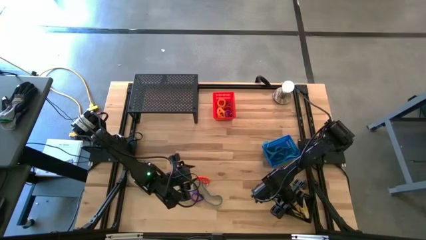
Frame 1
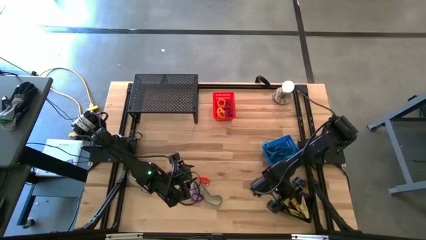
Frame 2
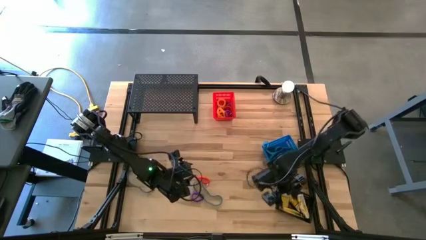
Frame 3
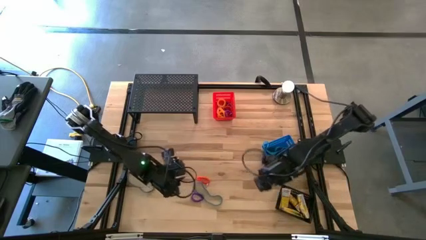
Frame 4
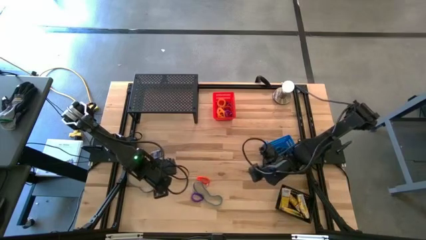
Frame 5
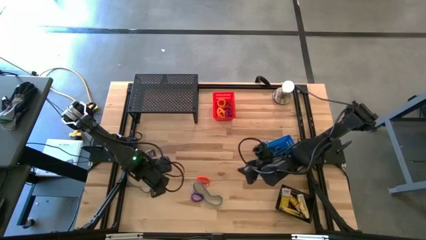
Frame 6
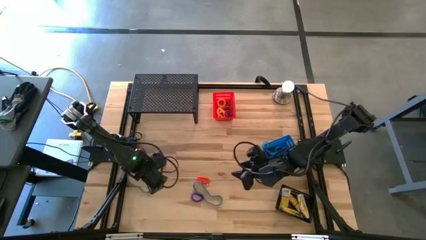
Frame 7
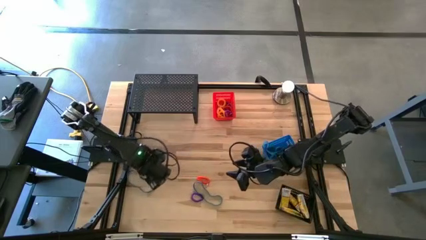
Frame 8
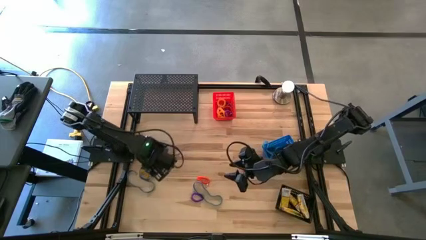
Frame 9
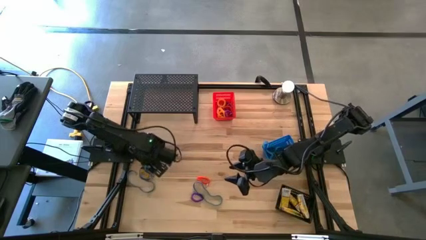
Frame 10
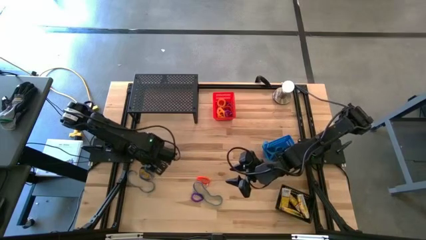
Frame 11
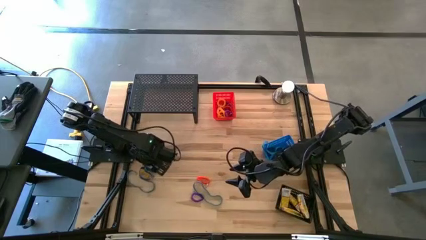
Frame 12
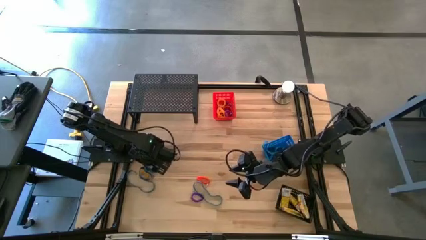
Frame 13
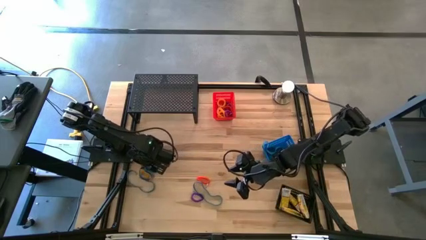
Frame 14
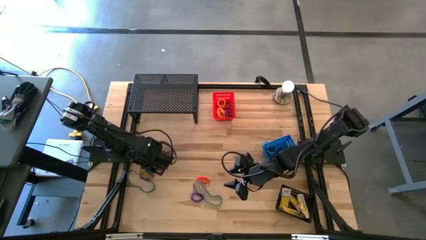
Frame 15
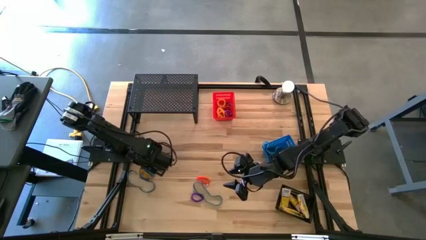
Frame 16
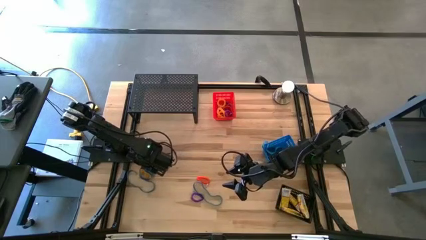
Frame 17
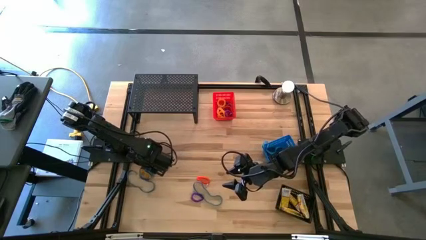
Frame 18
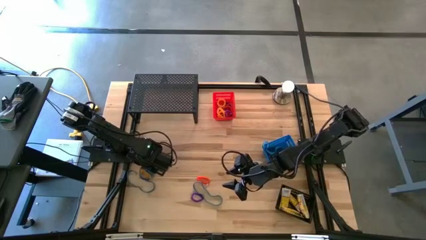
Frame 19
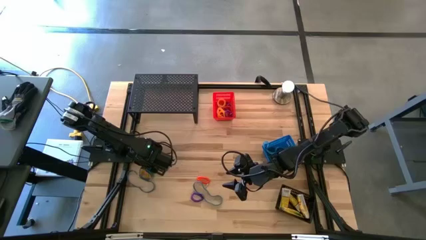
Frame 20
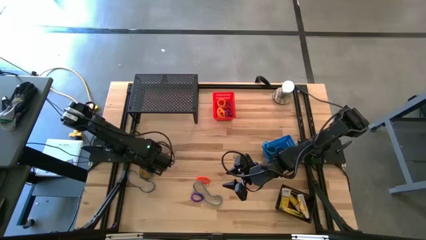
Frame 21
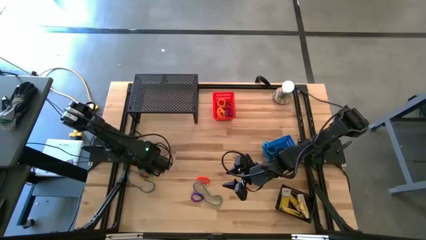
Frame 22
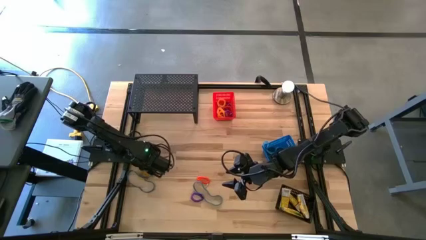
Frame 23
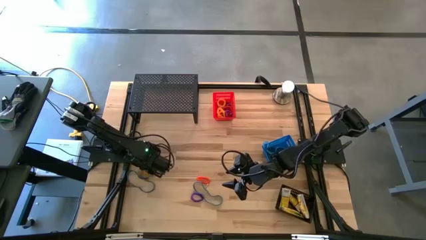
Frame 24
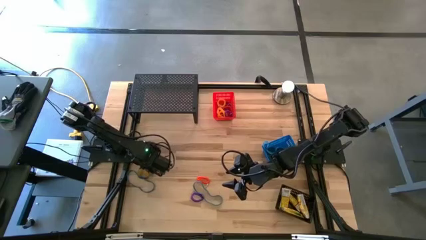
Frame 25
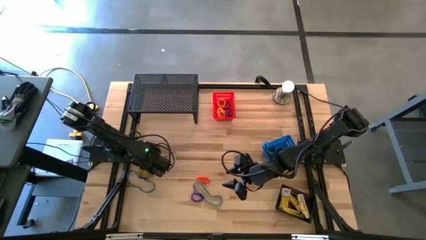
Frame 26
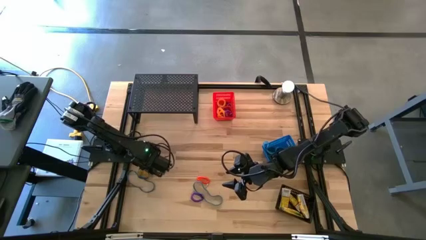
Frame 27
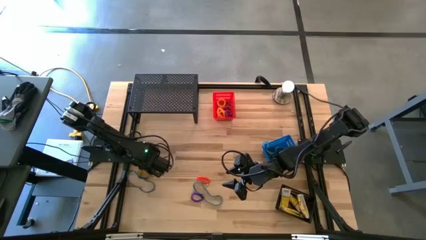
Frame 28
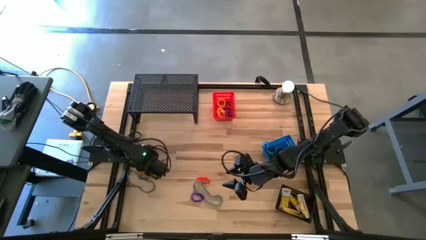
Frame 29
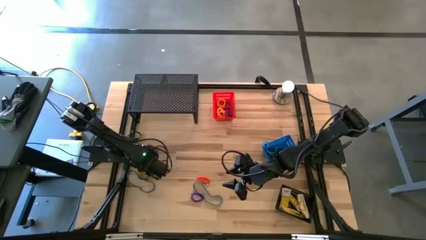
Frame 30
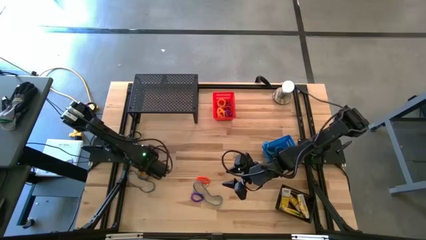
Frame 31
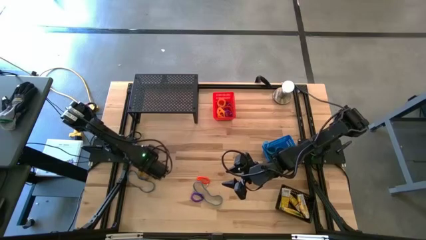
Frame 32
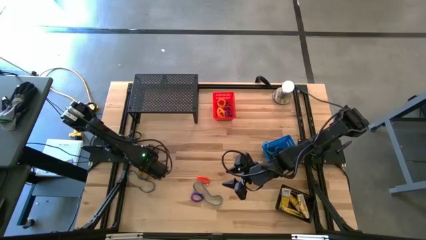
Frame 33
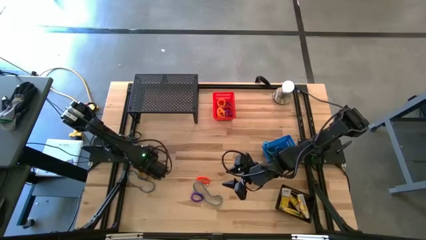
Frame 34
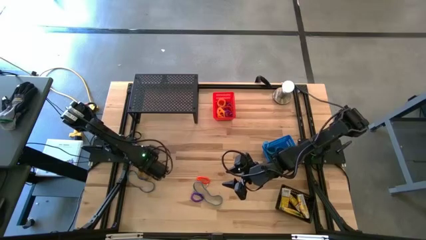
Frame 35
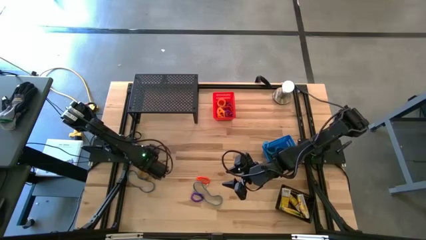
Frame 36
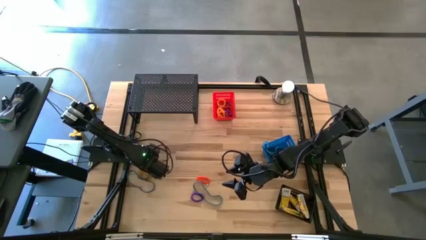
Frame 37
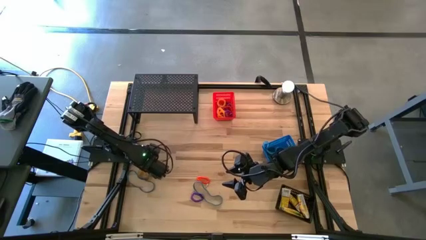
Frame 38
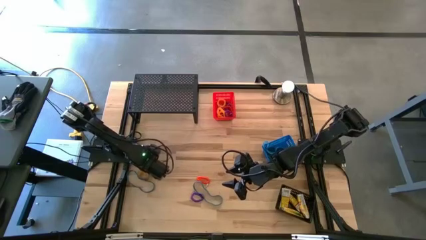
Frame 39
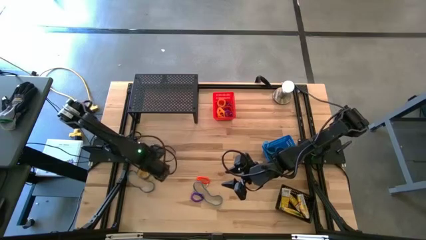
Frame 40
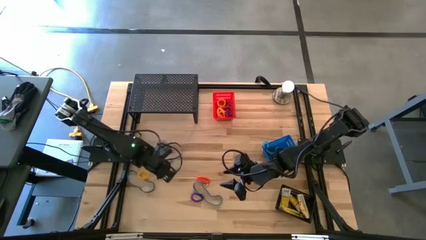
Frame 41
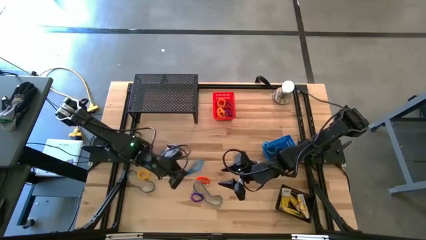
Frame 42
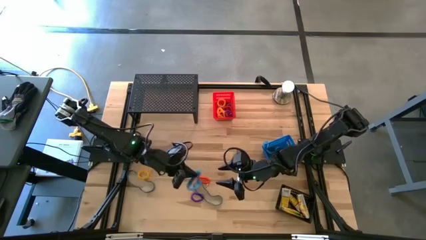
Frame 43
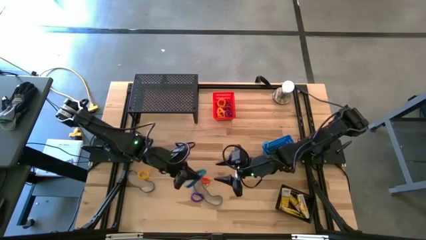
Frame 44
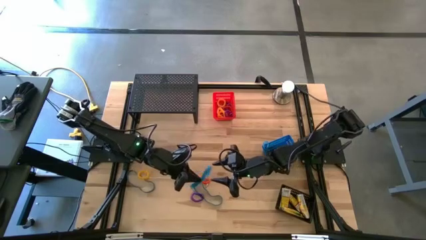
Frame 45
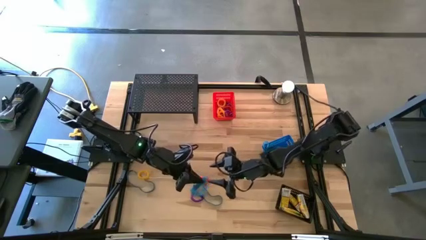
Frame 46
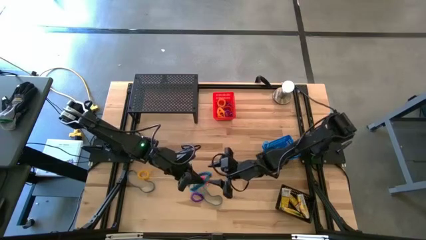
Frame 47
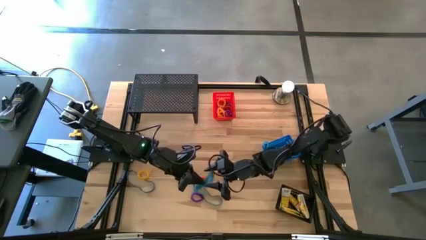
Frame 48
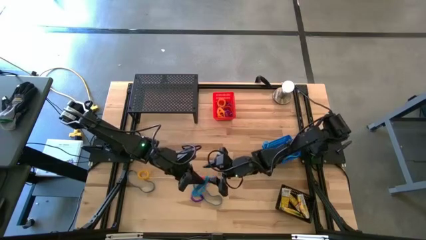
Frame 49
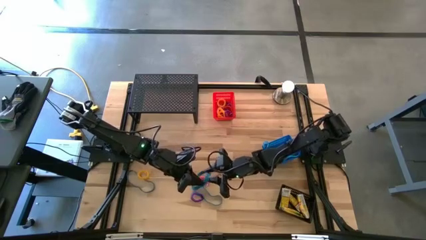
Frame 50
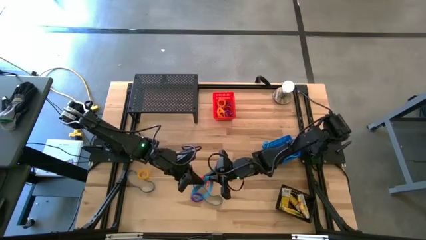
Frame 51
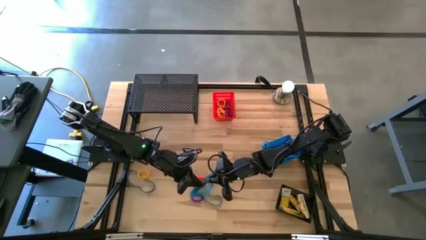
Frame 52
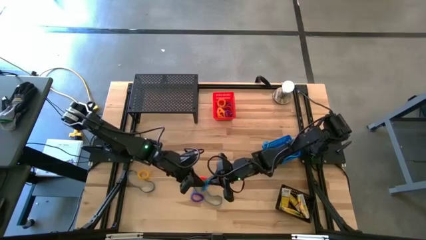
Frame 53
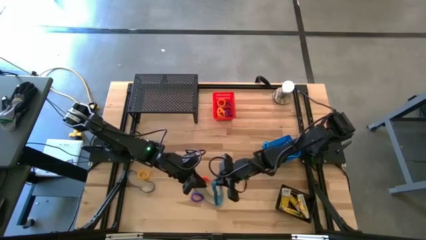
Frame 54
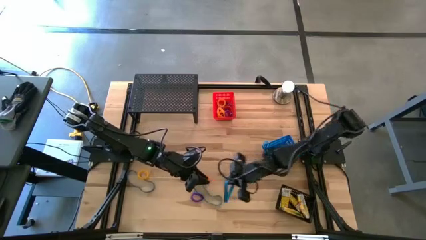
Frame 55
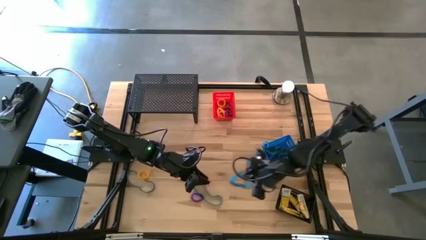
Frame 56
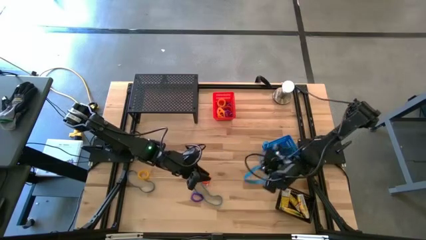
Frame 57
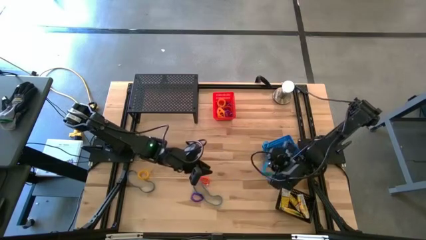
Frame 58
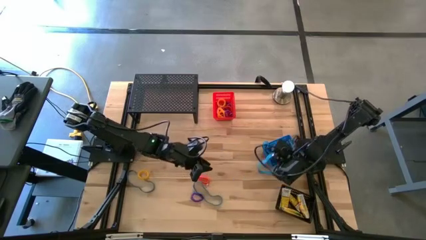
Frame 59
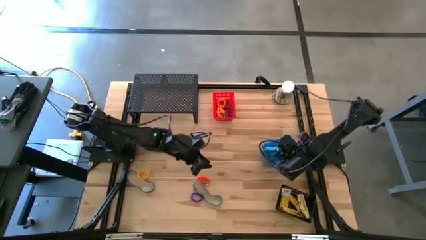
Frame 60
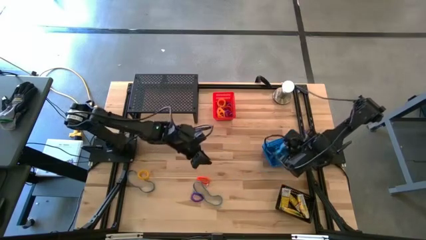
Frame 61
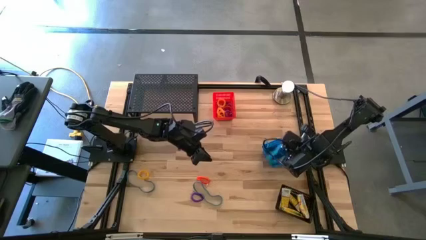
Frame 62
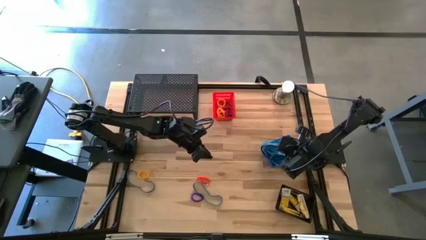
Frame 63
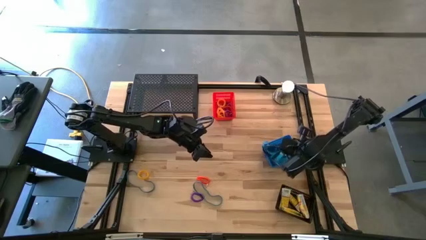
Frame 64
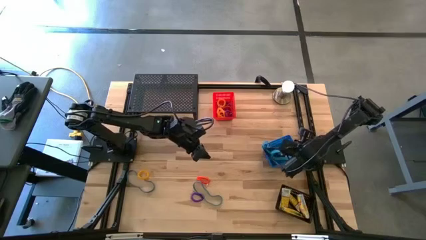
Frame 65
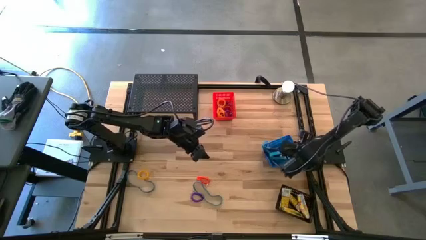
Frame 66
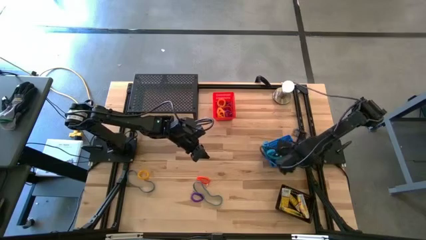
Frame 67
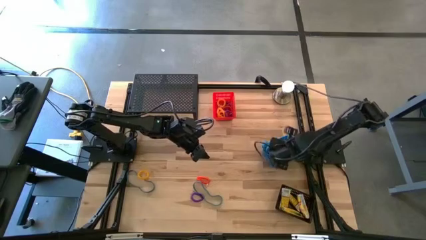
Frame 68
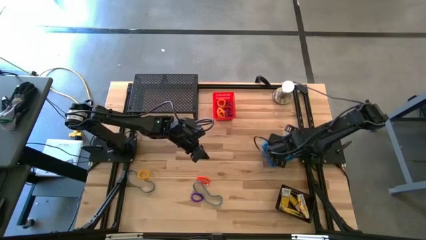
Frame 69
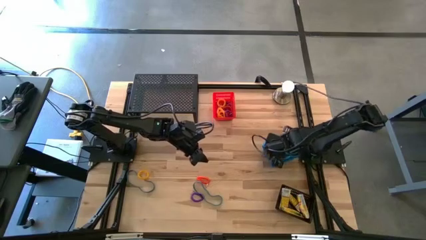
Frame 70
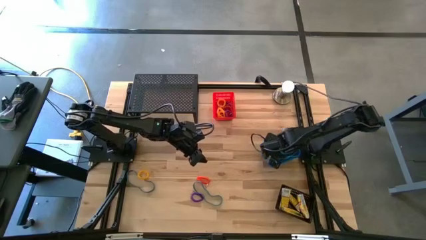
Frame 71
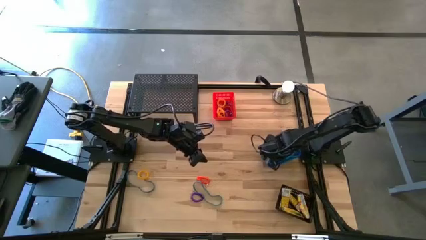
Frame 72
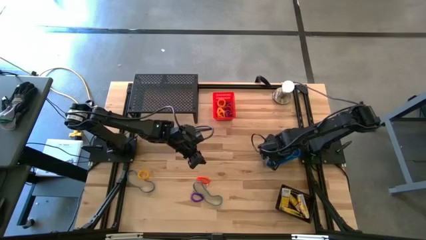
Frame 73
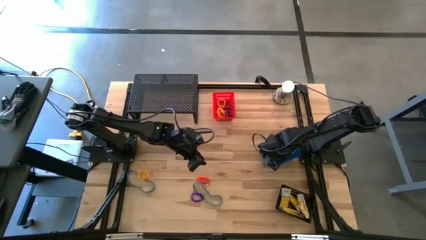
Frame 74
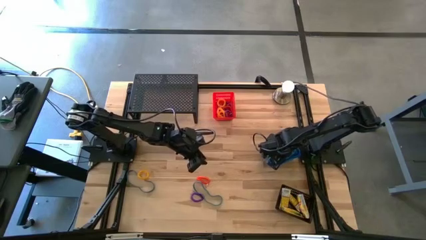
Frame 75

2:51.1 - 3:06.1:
Task: Pick & Place Office Desk Supplies
Put the blue rubber band into the blue bin

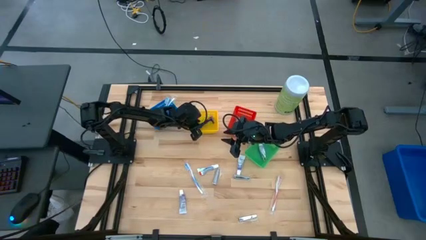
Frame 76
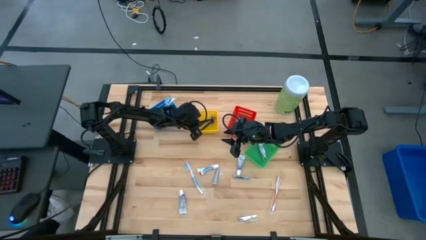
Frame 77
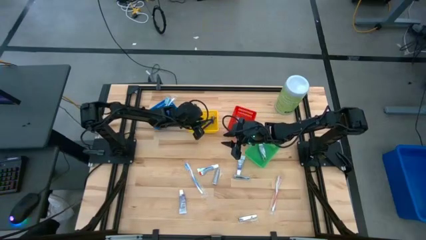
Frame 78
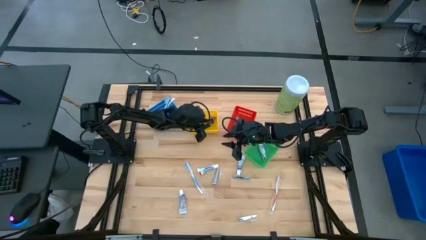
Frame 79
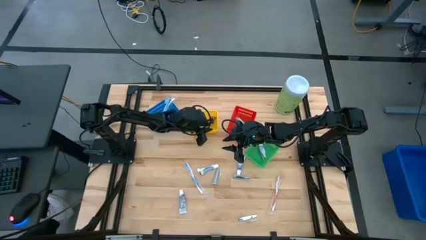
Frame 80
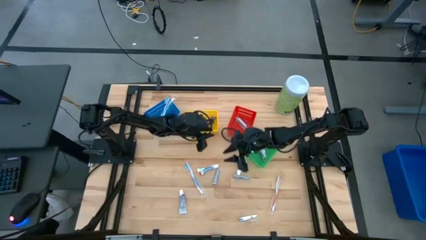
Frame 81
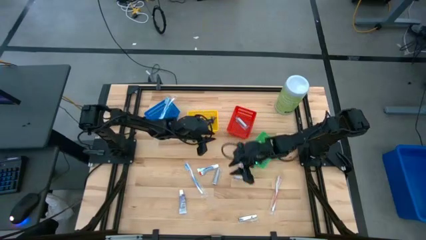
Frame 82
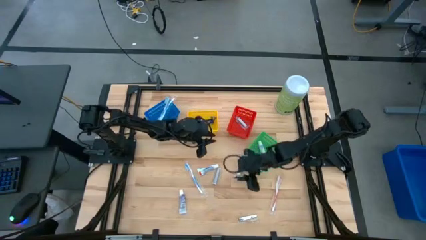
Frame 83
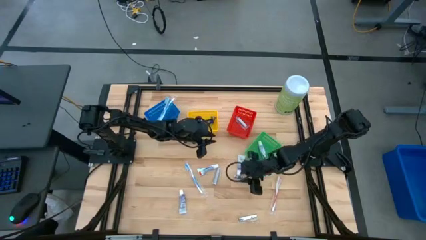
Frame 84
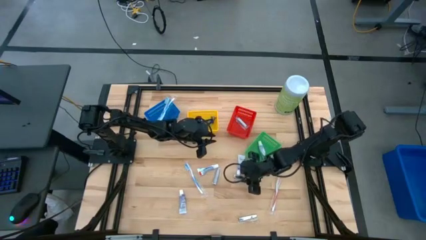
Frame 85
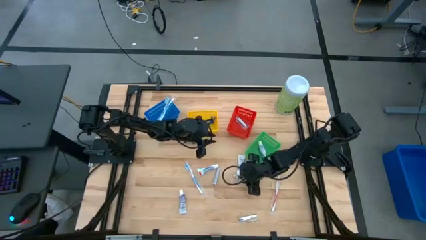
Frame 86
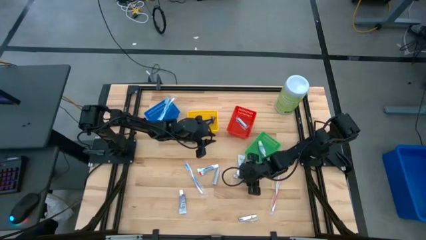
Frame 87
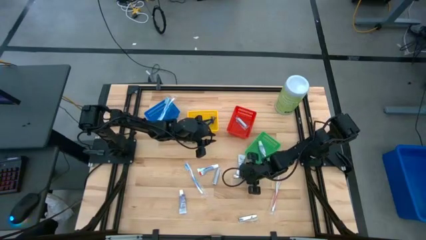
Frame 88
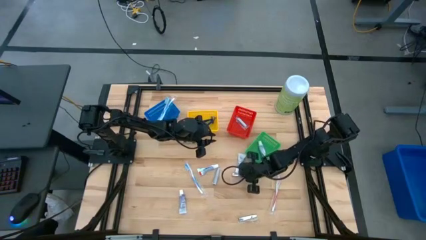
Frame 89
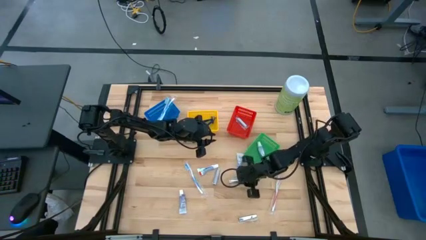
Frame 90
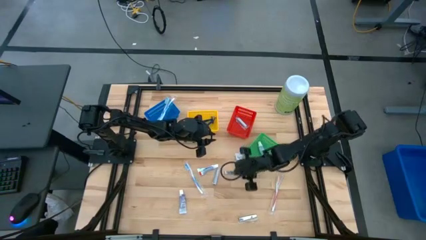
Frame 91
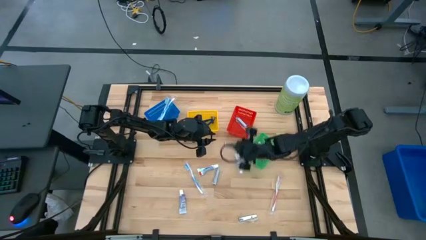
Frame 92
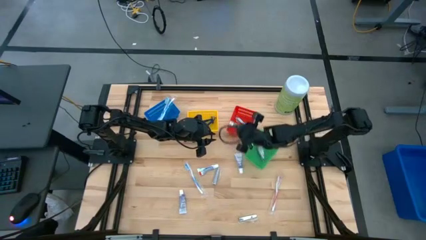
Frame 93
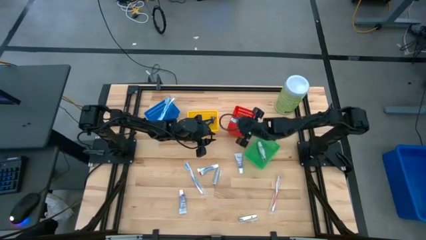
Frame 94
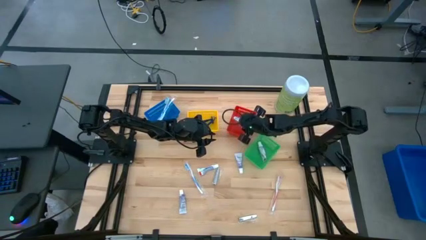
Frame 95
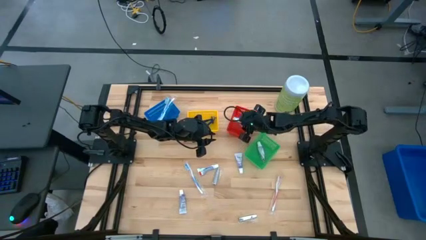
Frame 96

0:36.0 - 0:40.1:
Task: Pick & Place Travel size toiletries
Put the silver nail cutter into the red bin
